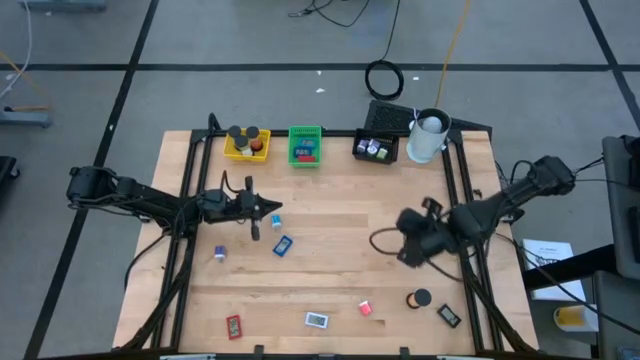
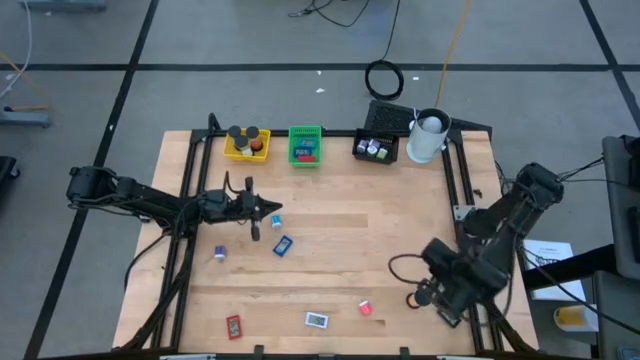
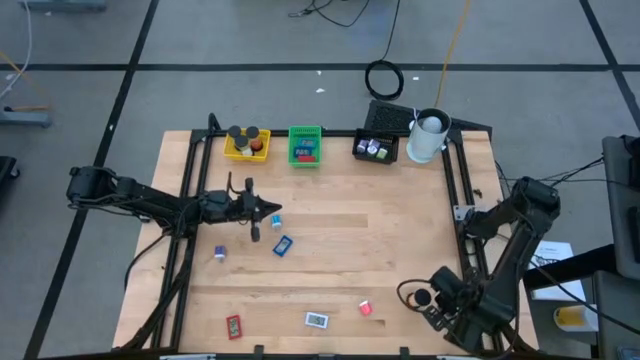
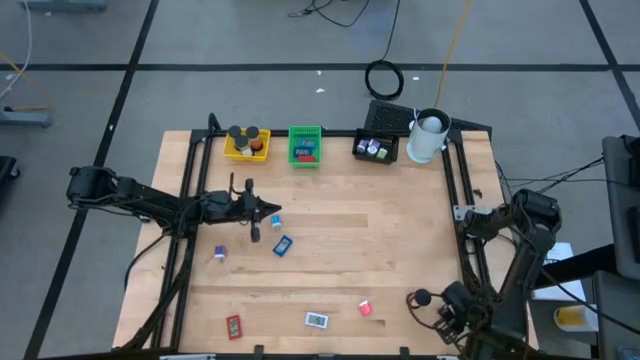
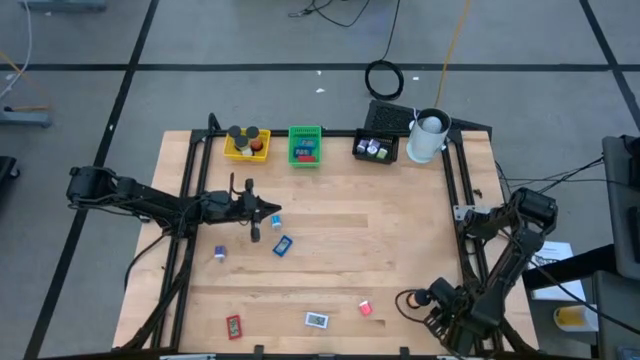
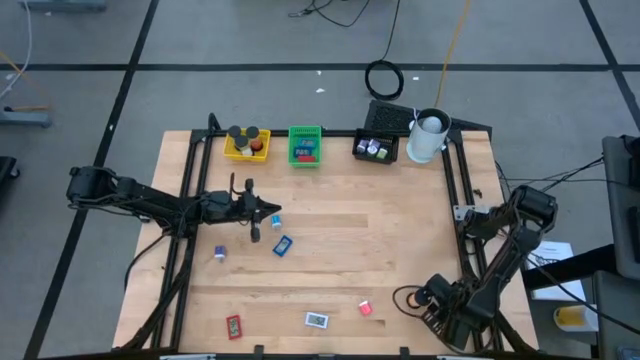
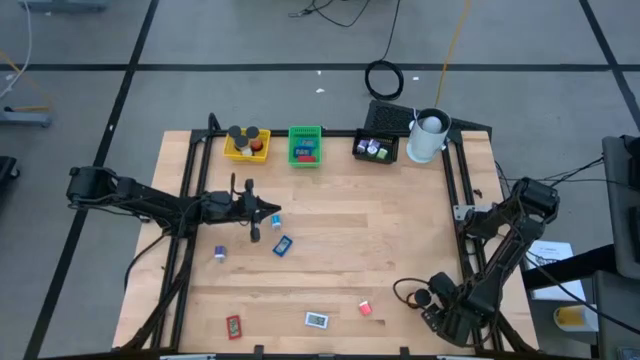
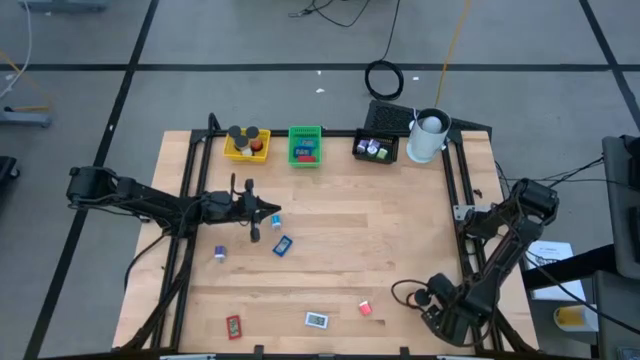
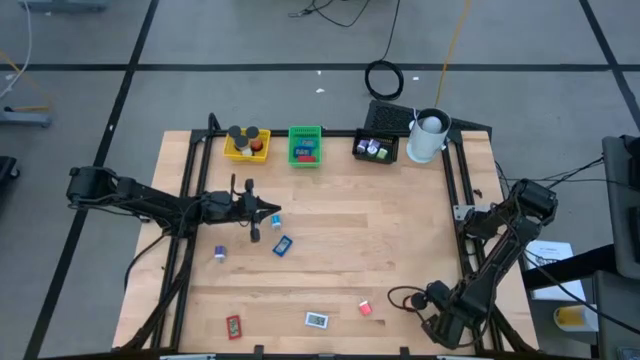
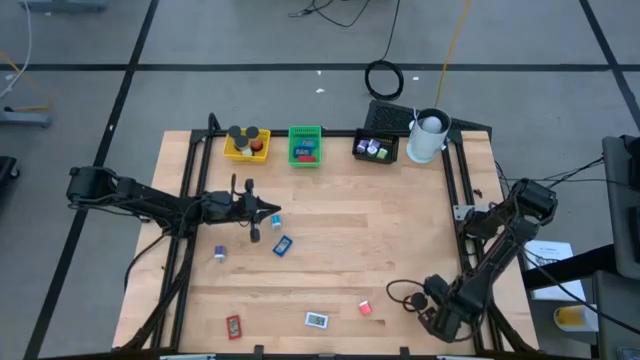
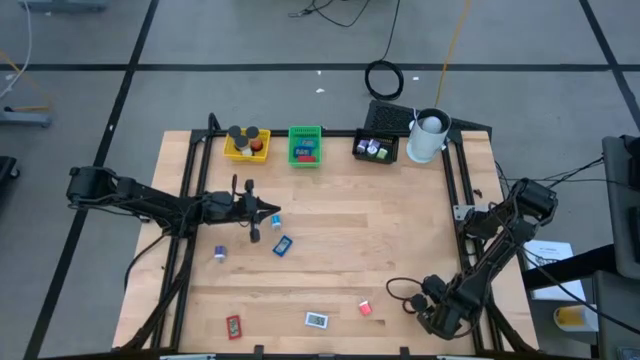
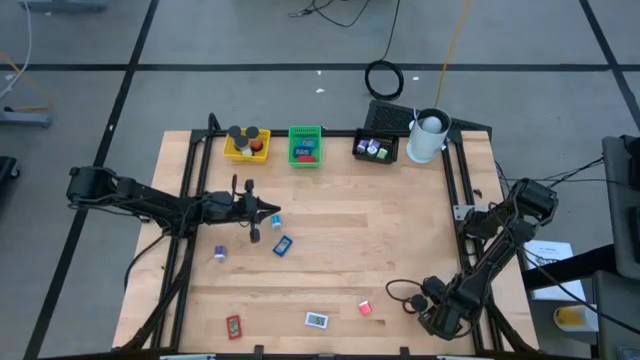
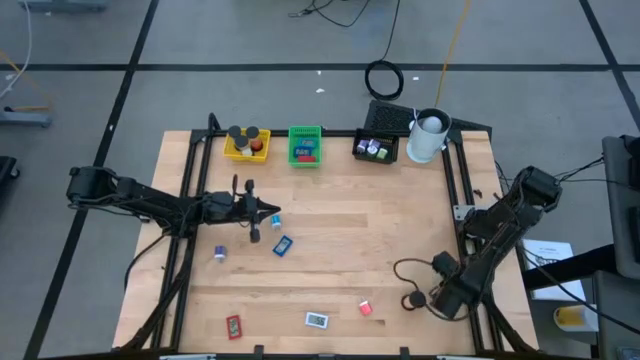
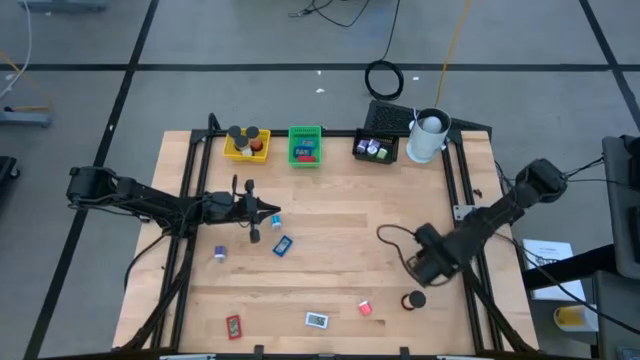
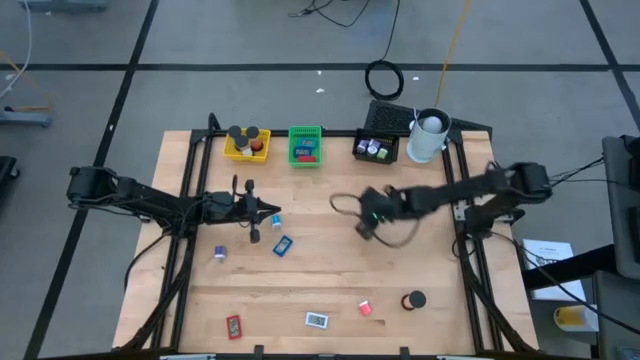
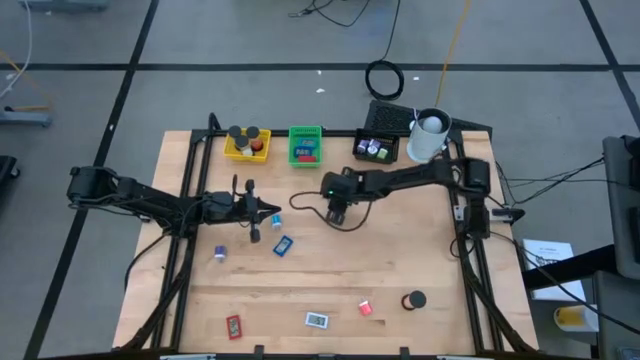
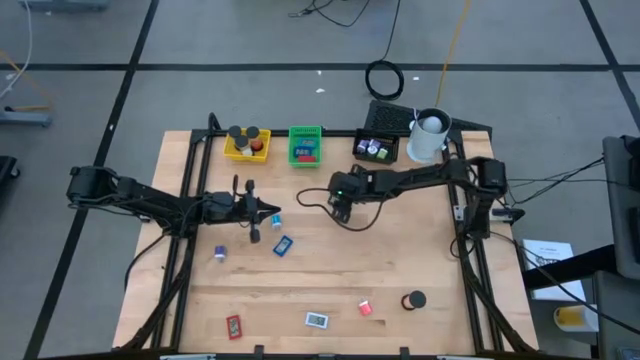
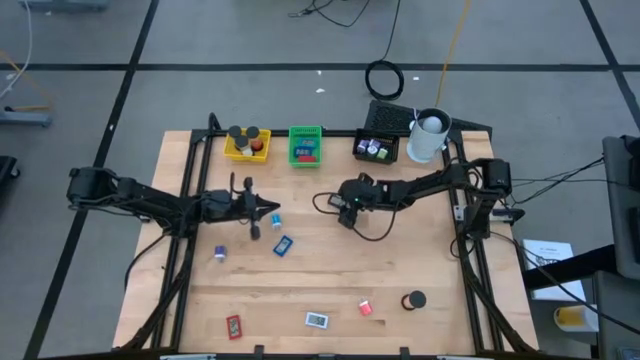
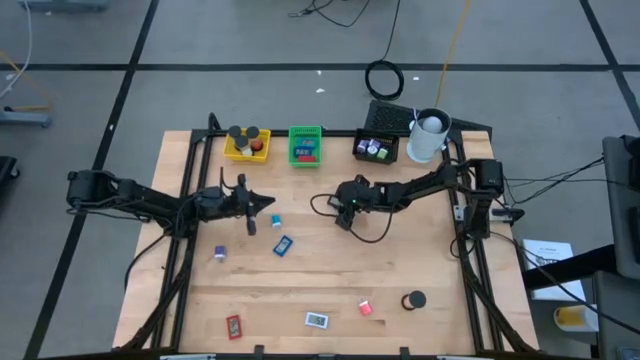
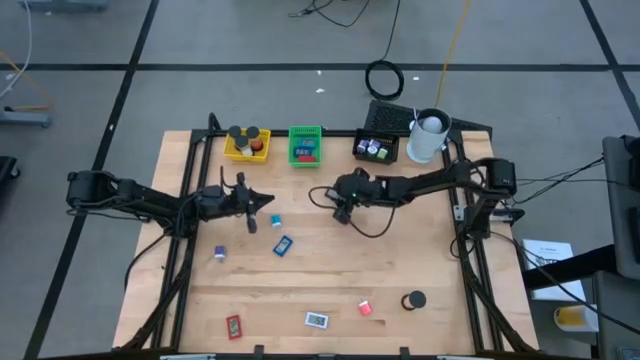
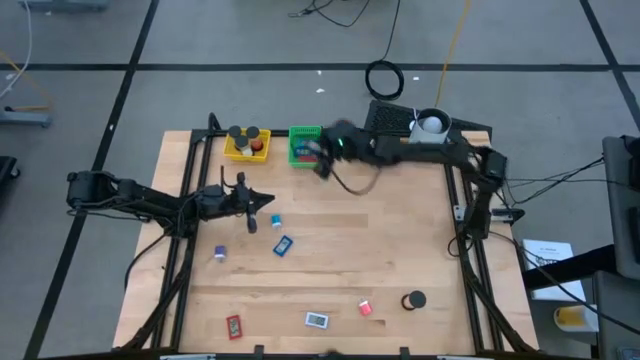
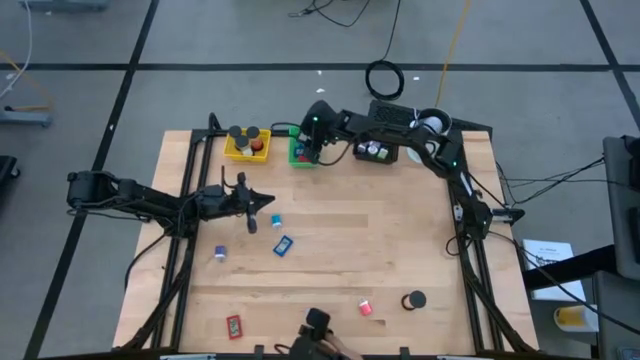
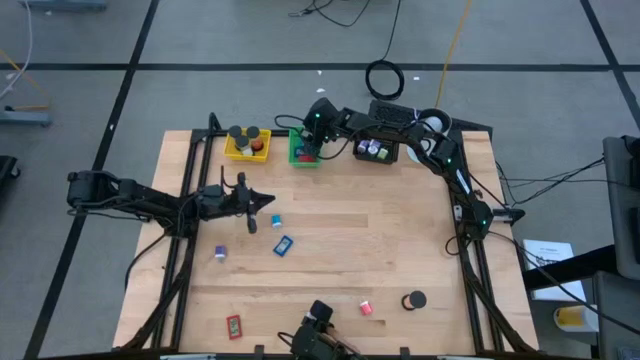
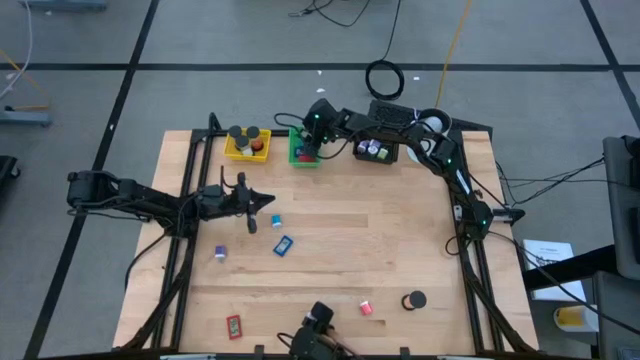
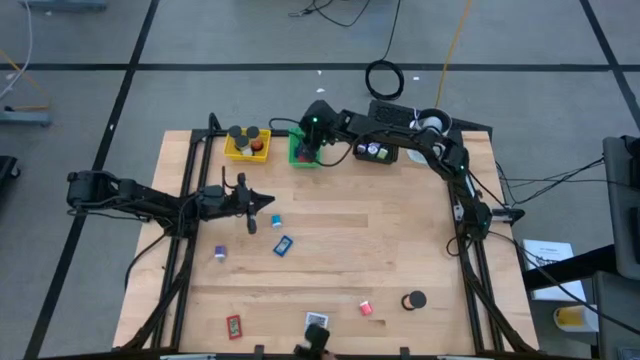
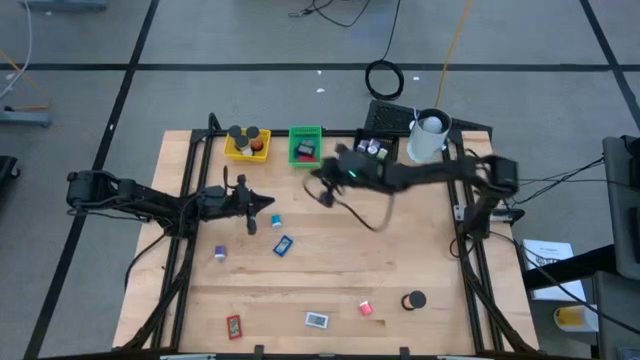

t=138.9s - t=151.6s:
Task: Pick & Place Office items
Put the black digital timer into the green bin

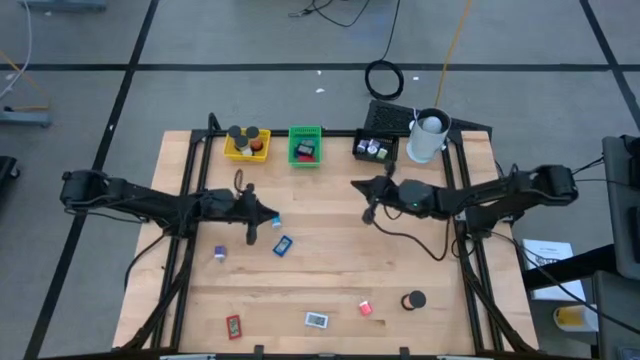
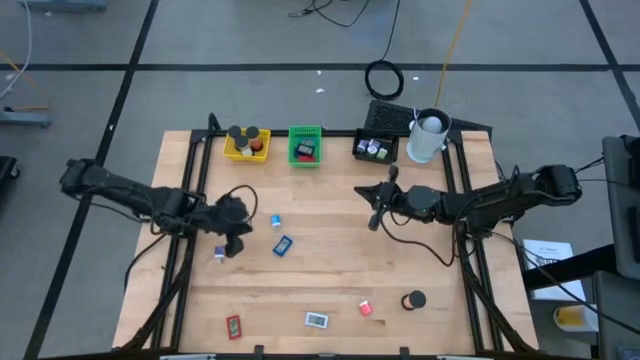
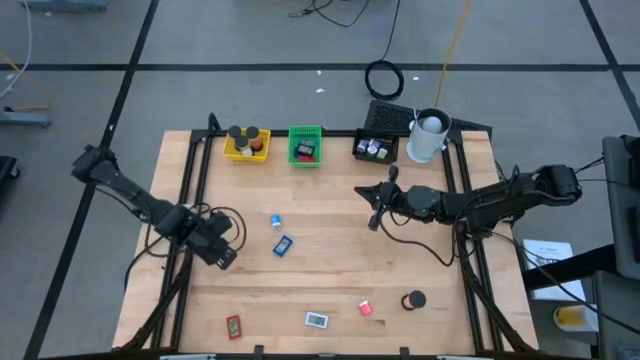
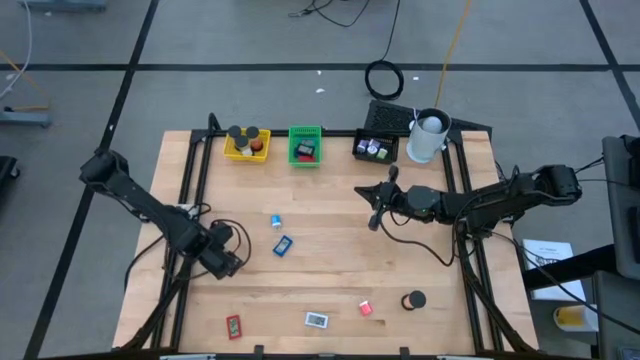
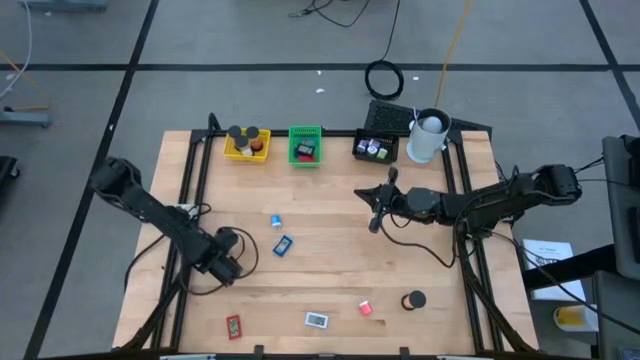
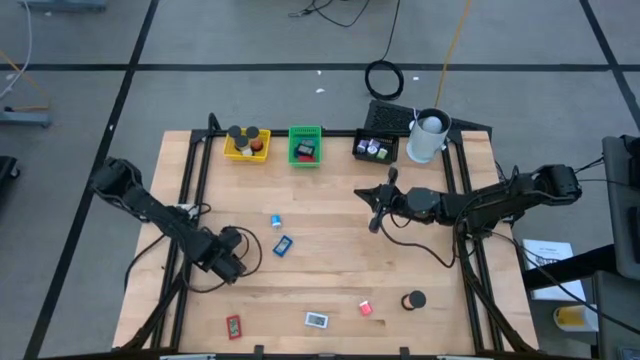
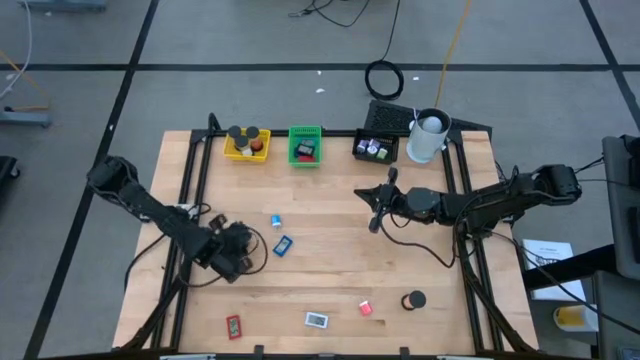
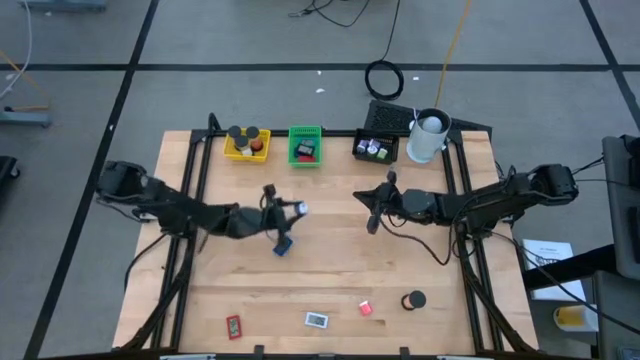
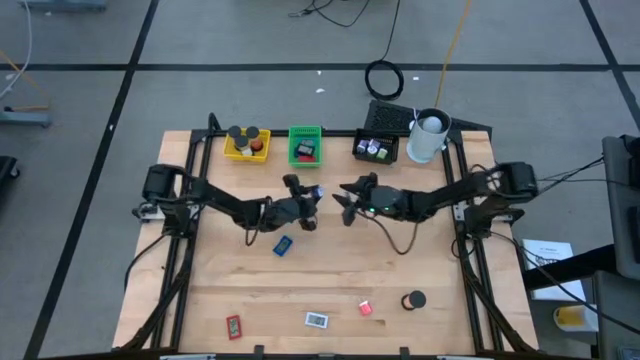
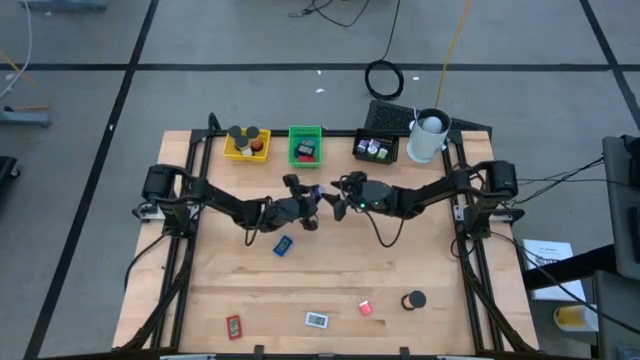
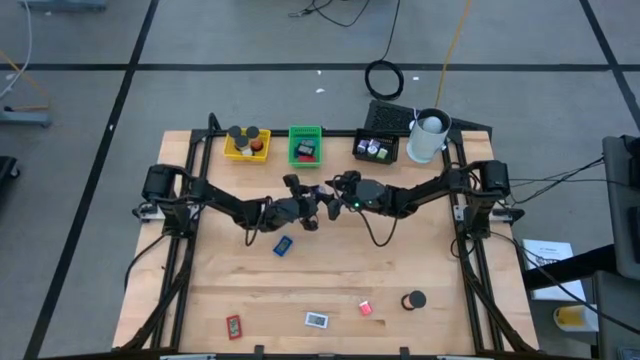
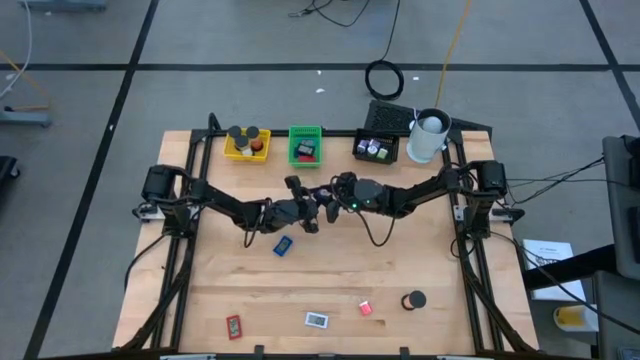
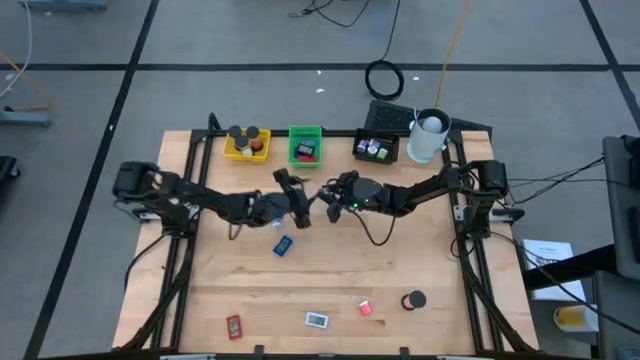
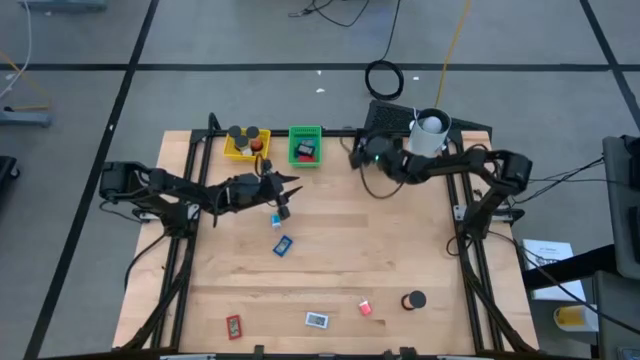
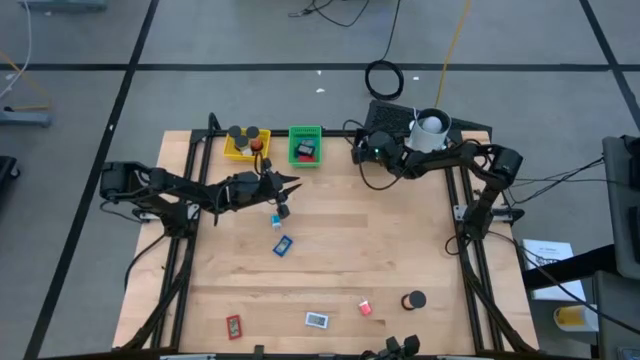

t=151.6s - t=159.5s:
Put the blue charger adapter into the black bin
